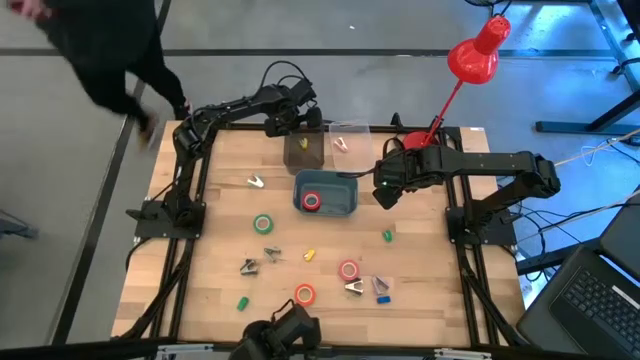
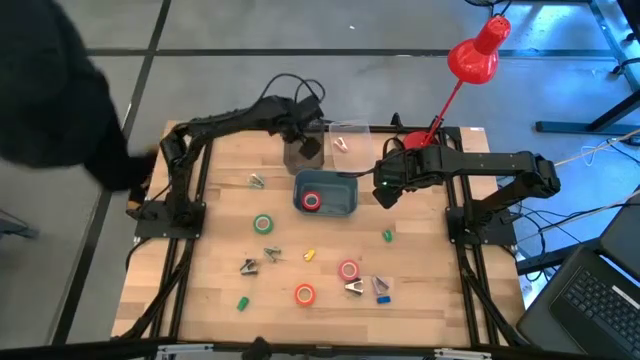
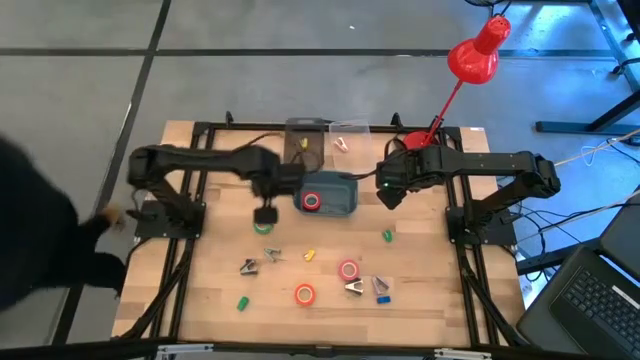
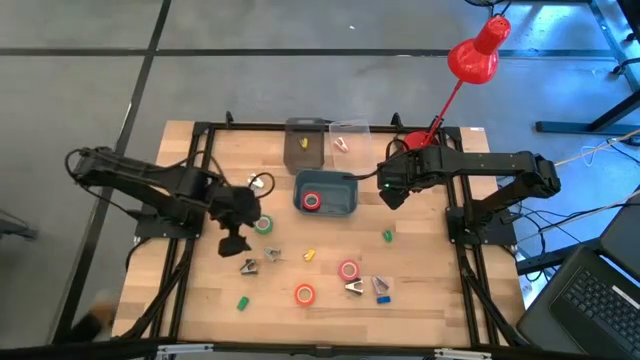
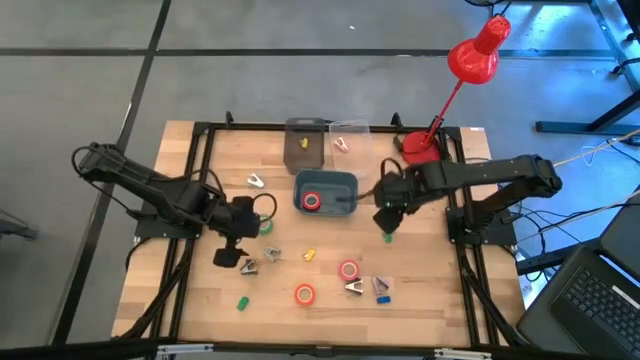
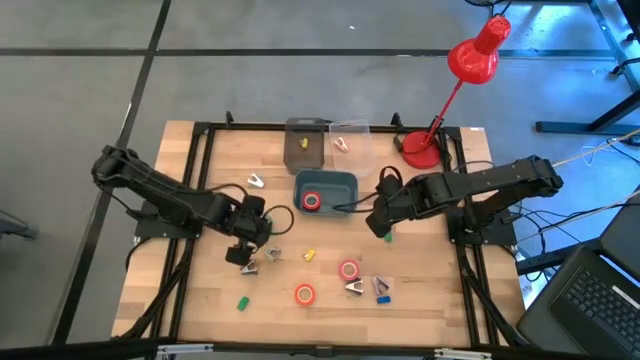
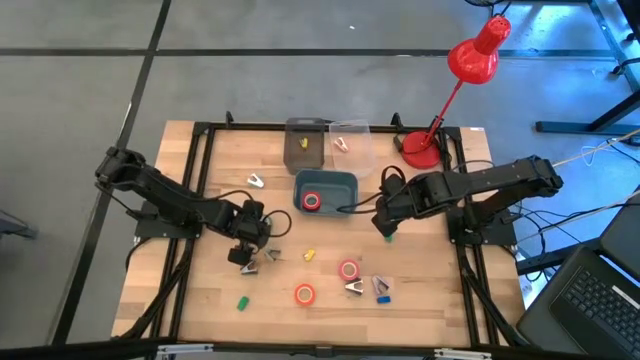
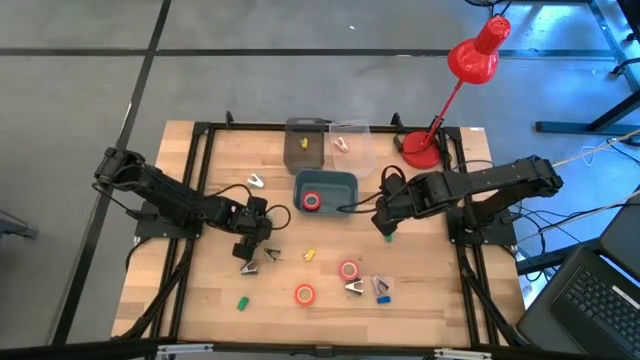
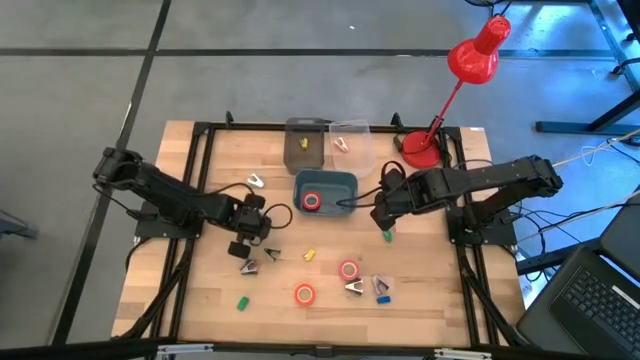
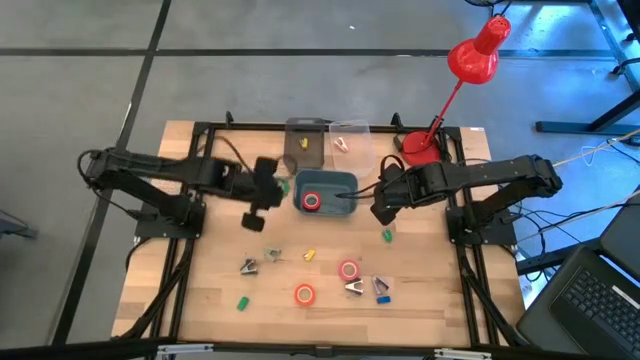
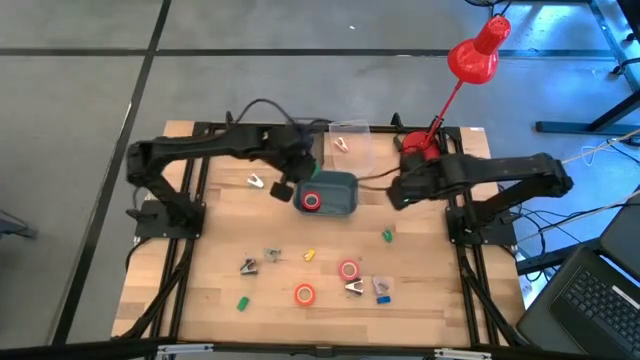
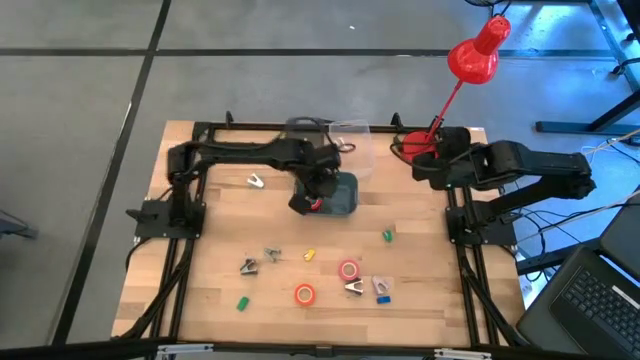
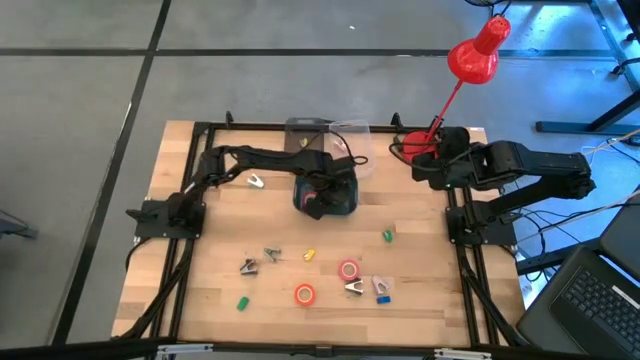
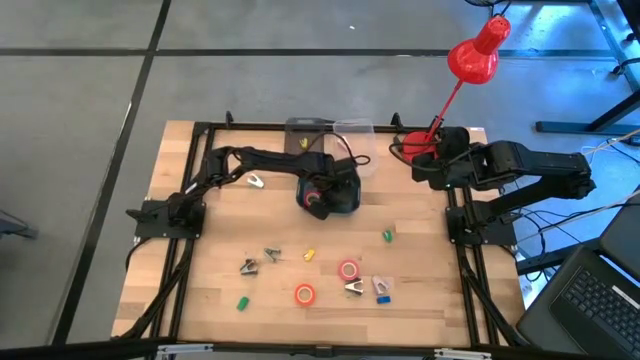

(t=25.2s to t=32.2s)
Task: Pick and place Stapler, Stapler remover, tape
Put the green tape into the blue bin

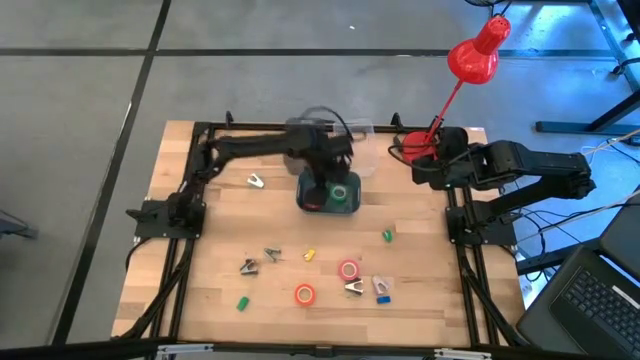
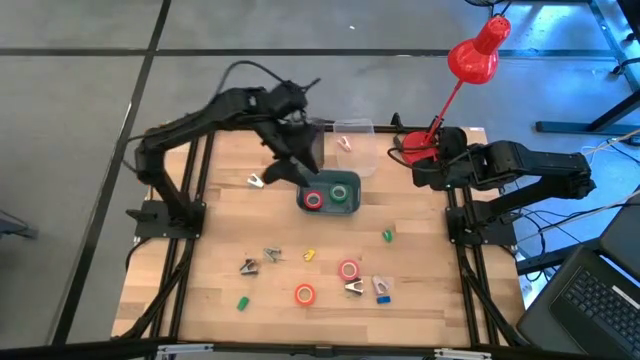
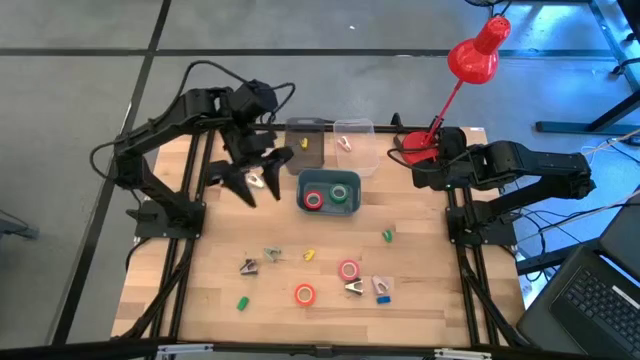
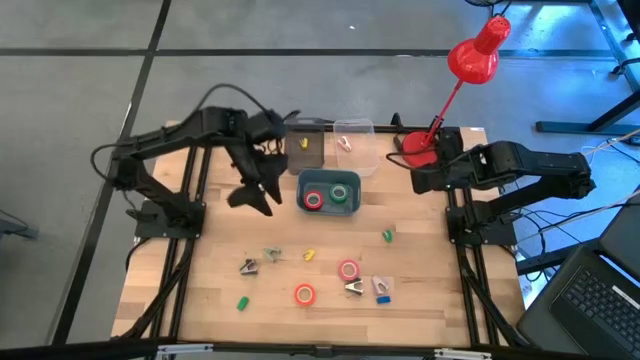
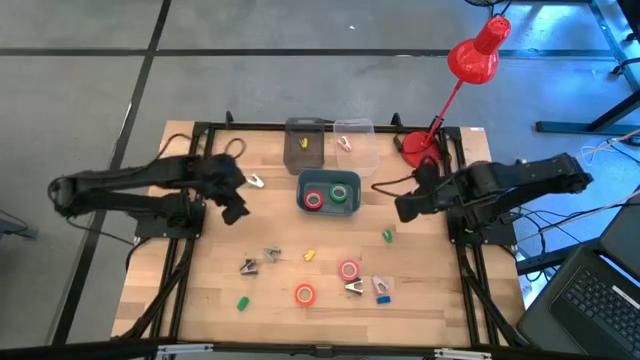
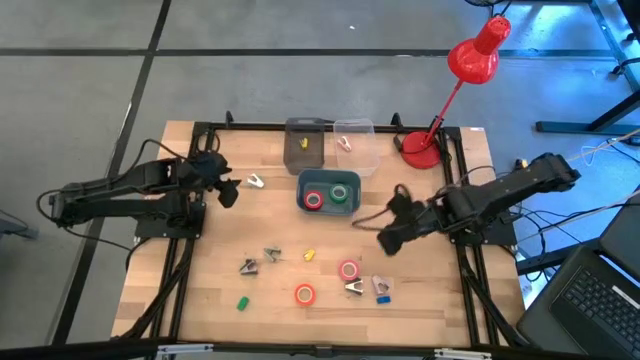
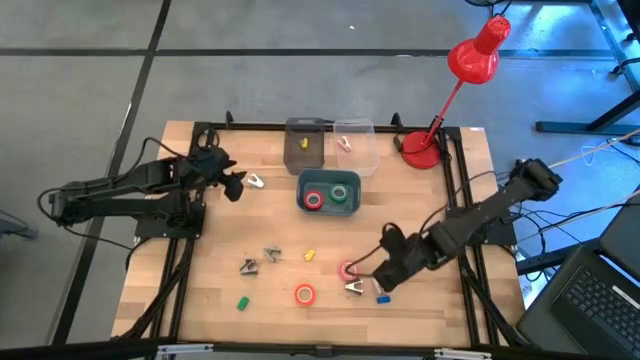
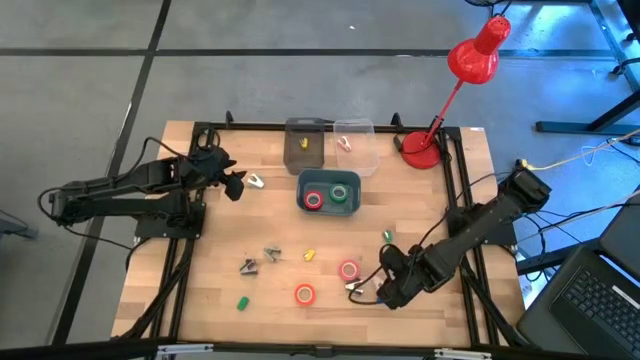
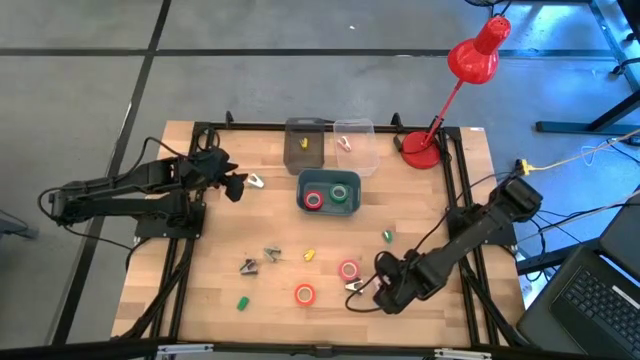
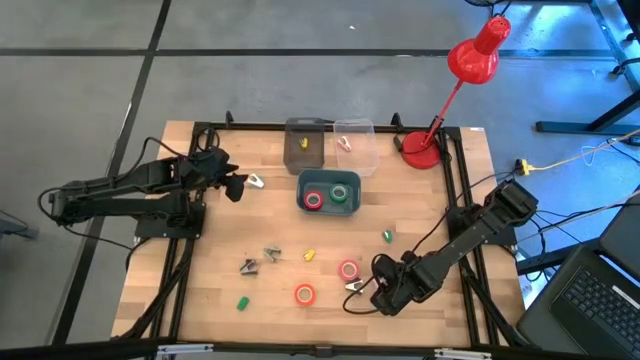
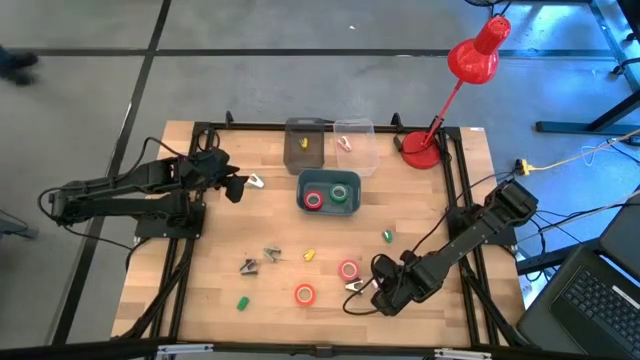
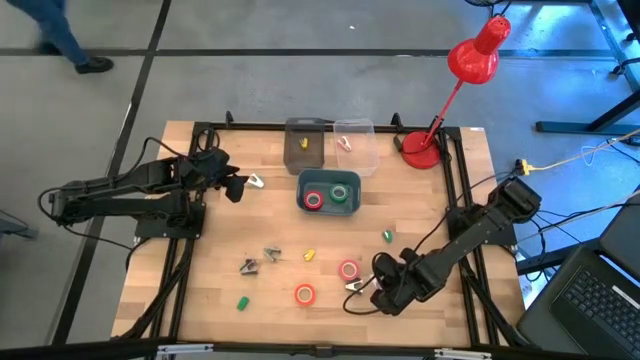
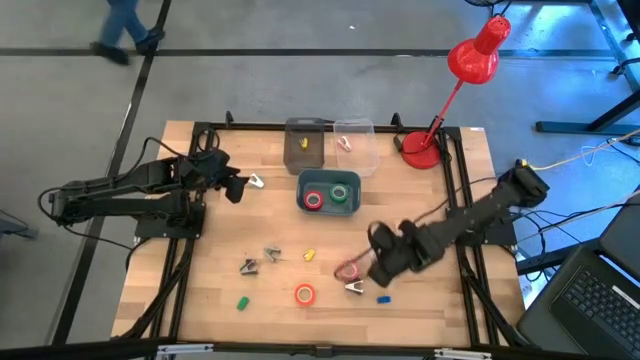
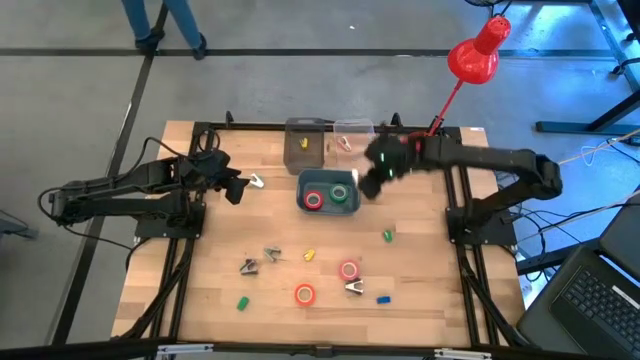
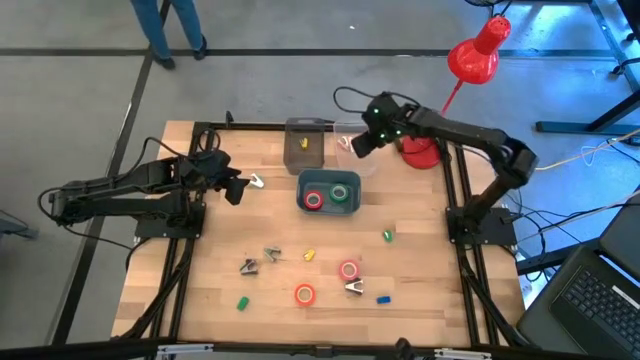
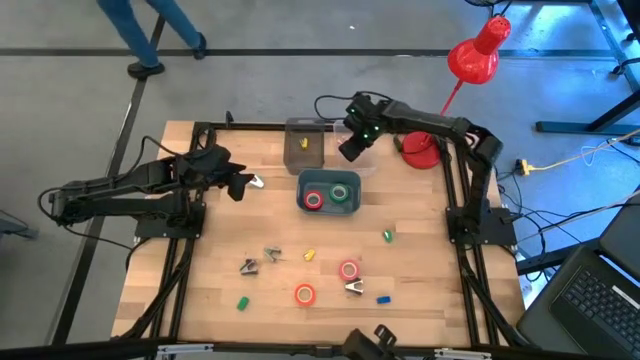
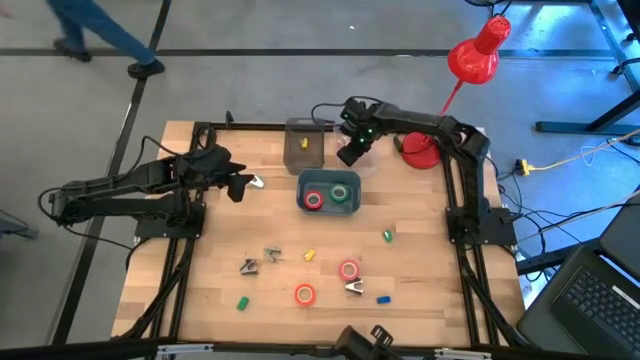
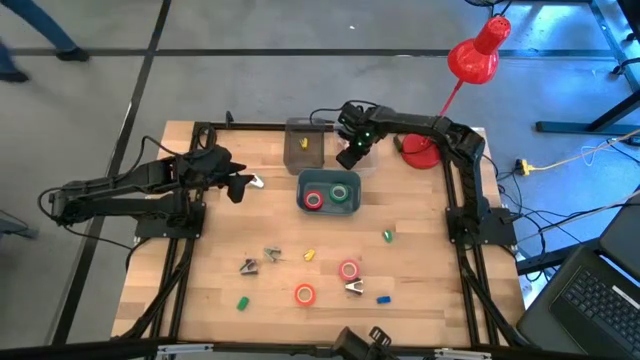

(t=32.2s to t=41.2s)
Put the purple staple remover into the white bin

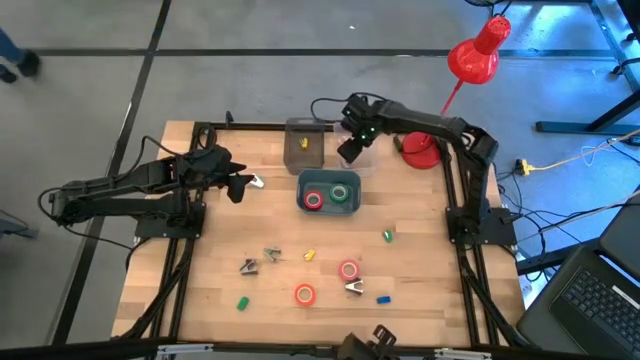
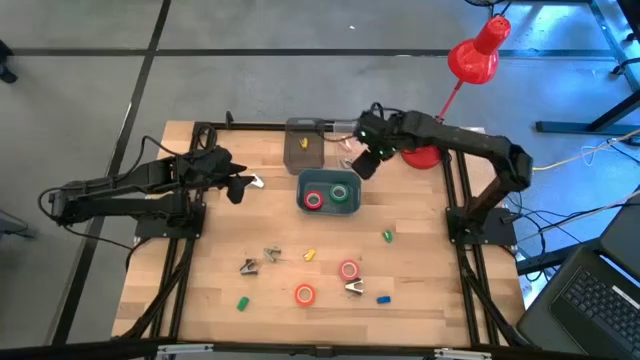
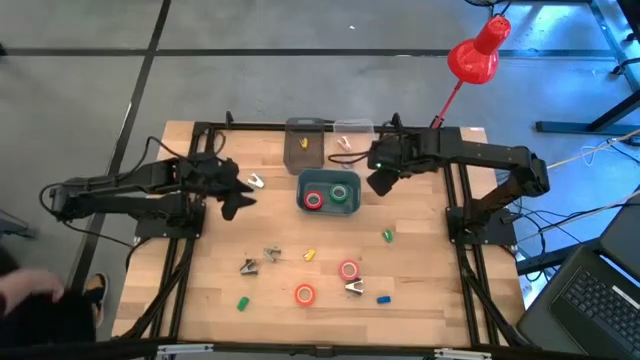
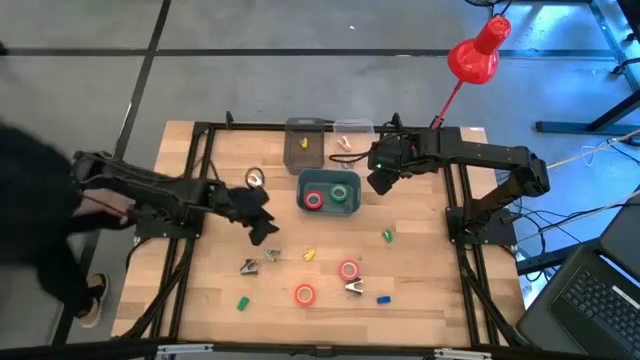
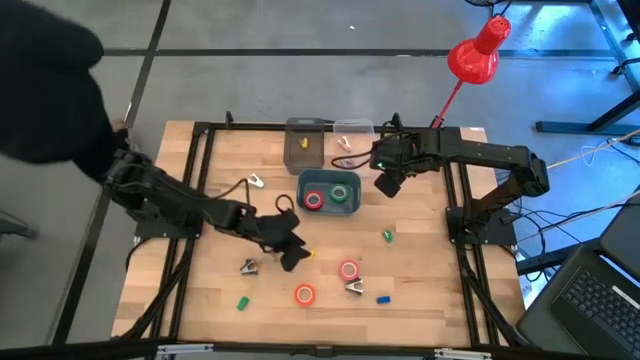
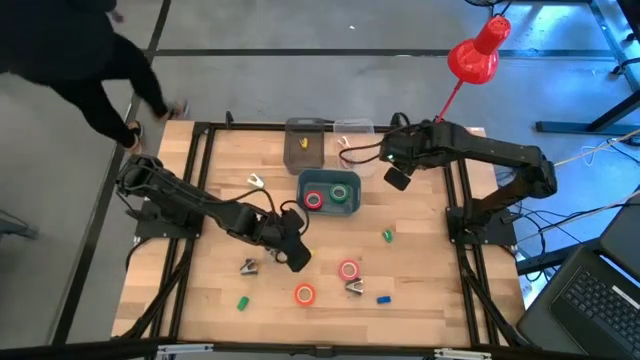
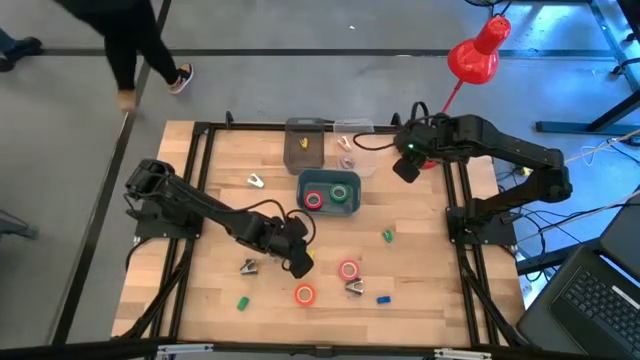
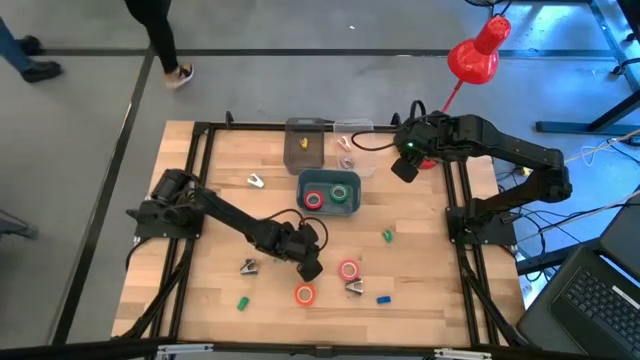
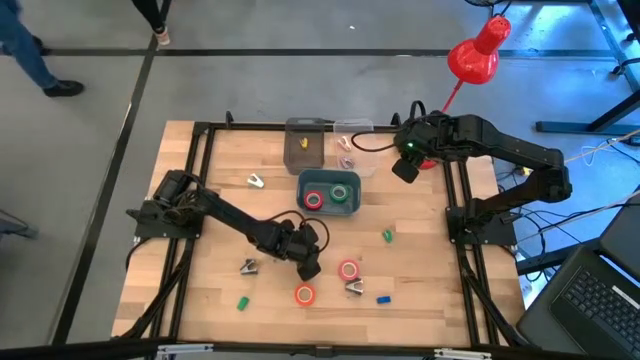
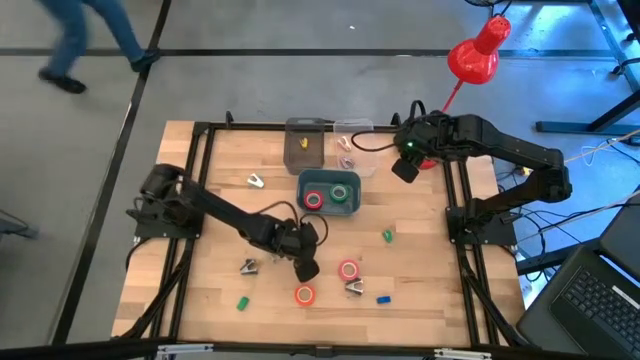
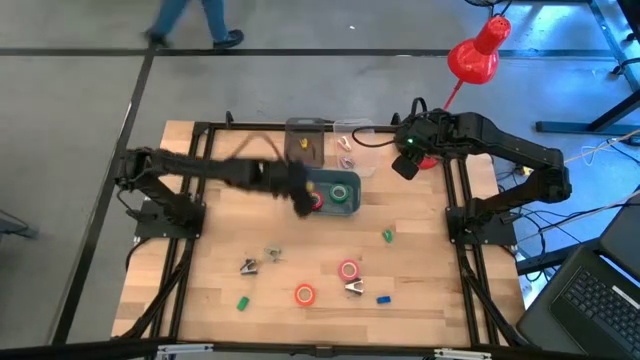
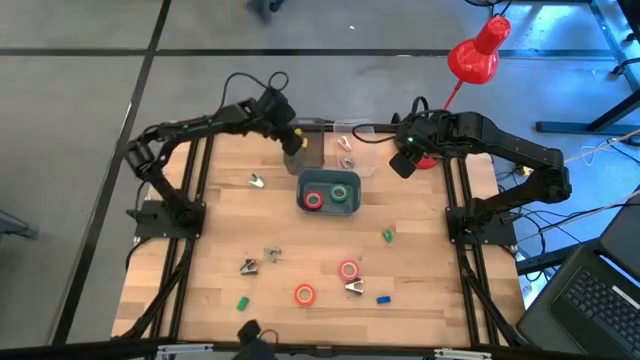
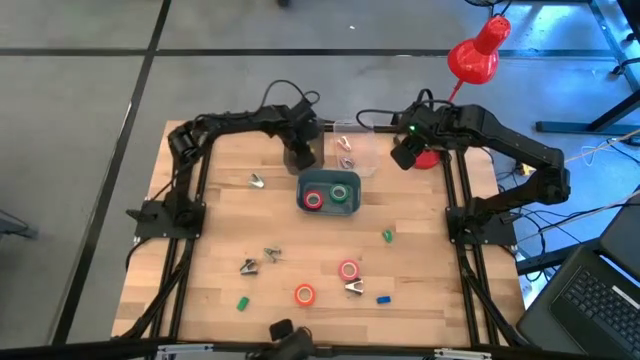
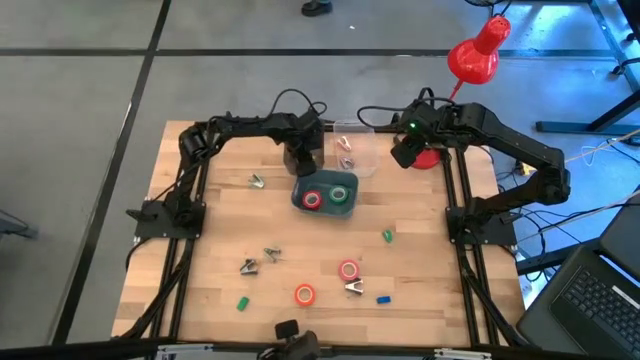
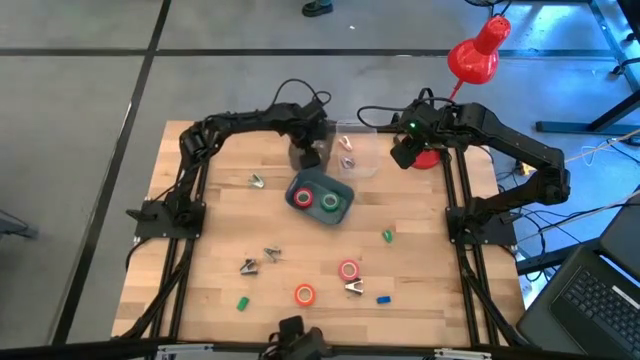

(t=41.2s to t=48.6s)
Put the yellow stapler into the black bin
